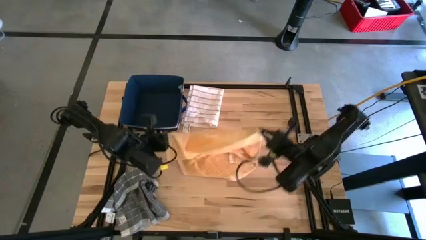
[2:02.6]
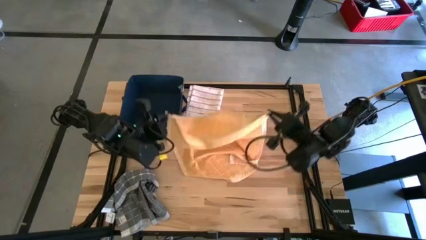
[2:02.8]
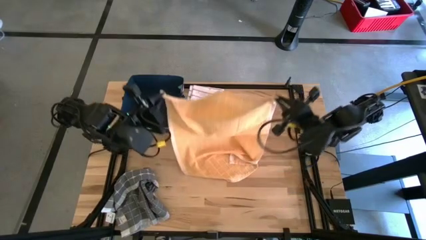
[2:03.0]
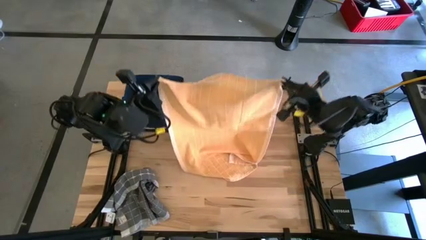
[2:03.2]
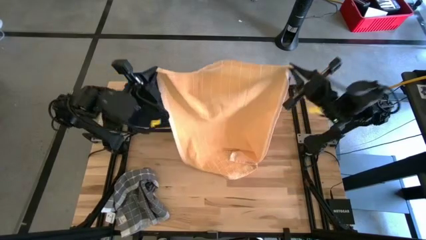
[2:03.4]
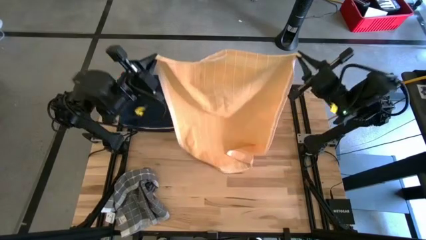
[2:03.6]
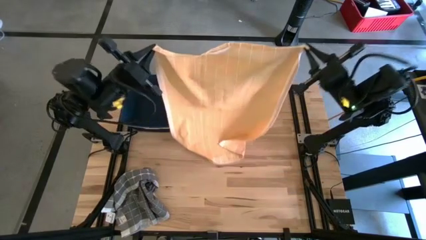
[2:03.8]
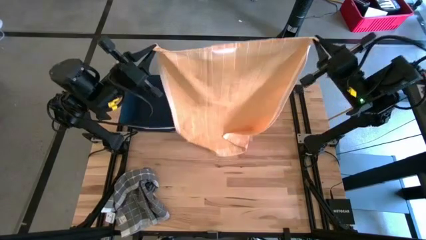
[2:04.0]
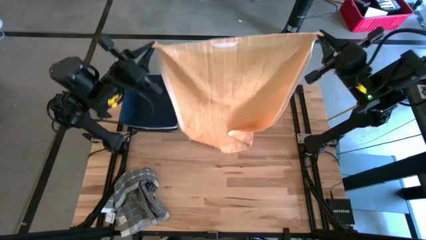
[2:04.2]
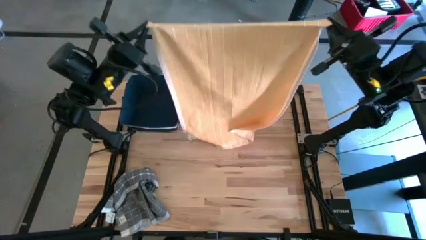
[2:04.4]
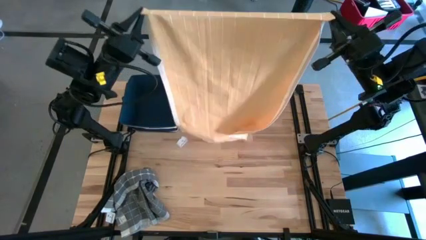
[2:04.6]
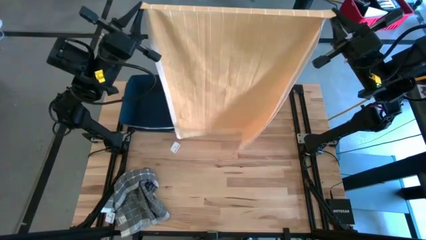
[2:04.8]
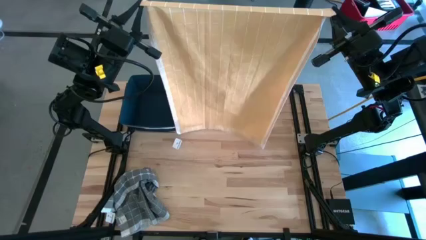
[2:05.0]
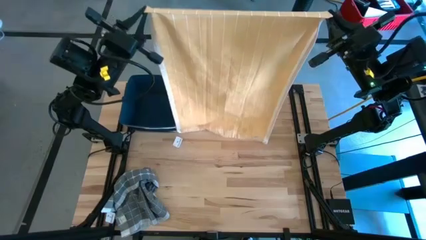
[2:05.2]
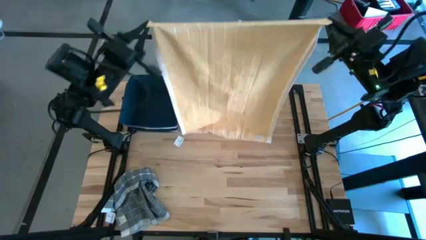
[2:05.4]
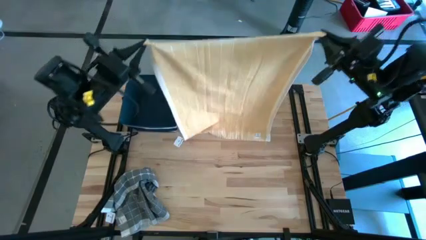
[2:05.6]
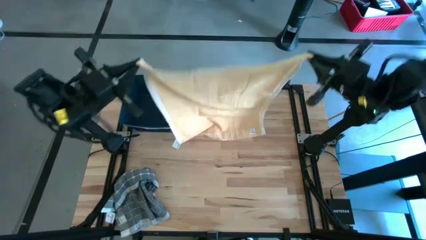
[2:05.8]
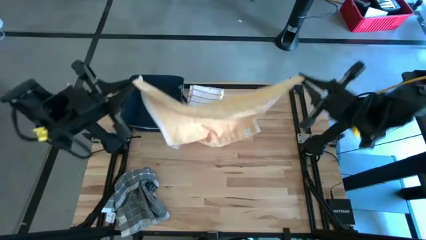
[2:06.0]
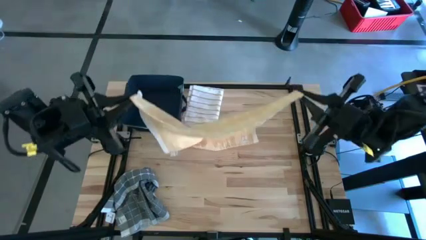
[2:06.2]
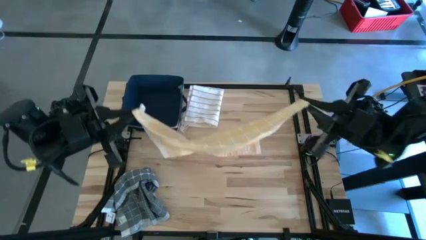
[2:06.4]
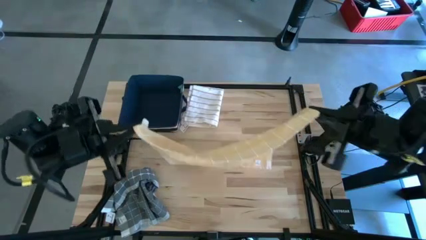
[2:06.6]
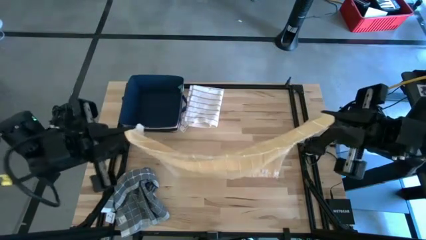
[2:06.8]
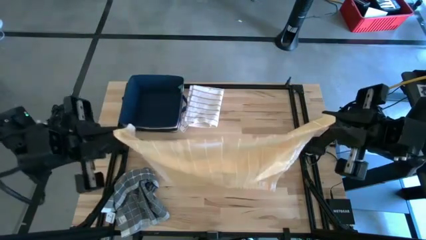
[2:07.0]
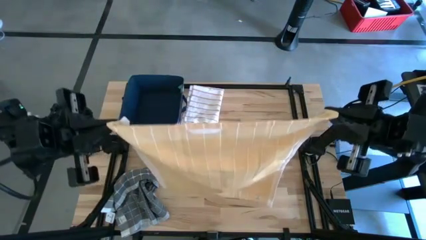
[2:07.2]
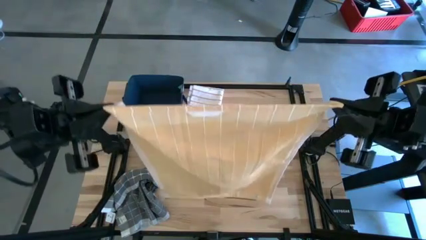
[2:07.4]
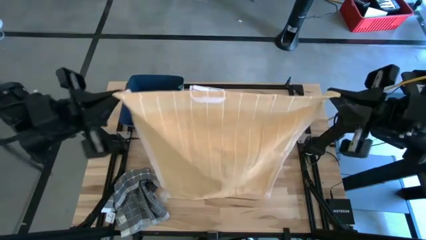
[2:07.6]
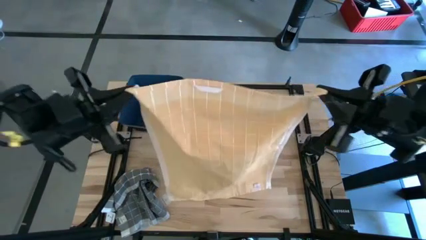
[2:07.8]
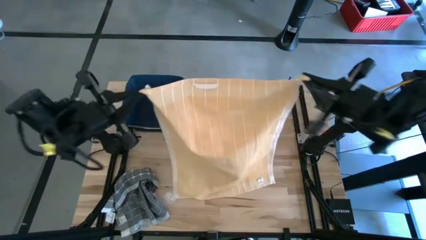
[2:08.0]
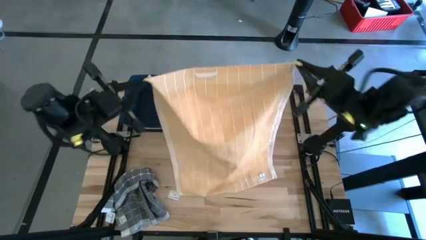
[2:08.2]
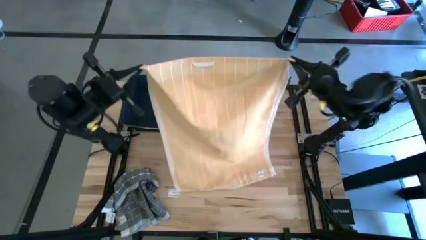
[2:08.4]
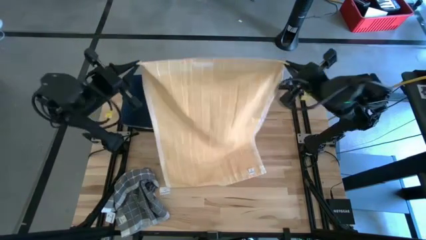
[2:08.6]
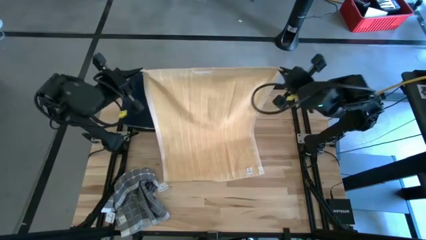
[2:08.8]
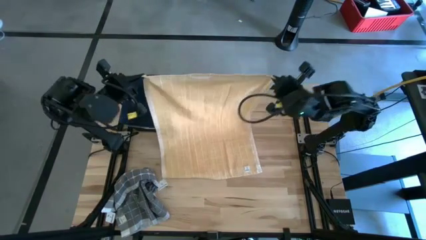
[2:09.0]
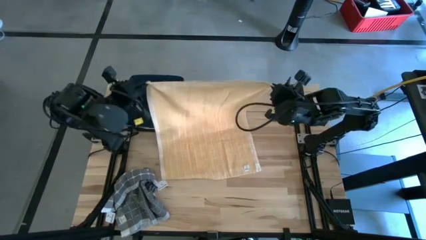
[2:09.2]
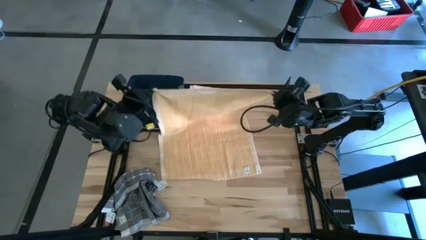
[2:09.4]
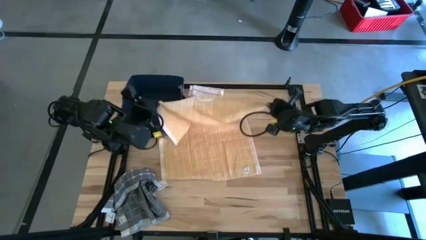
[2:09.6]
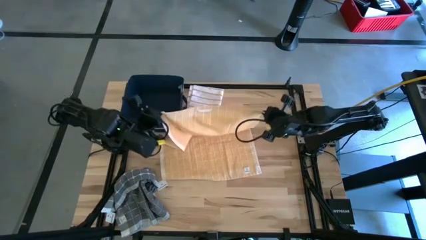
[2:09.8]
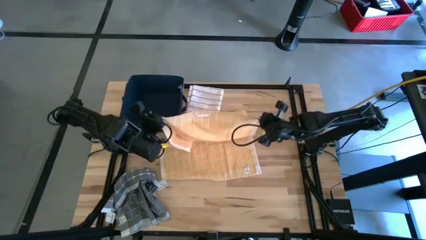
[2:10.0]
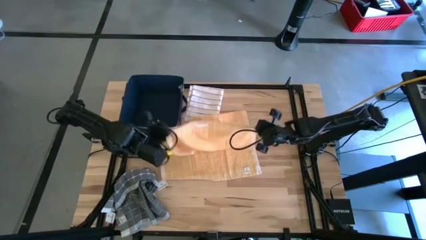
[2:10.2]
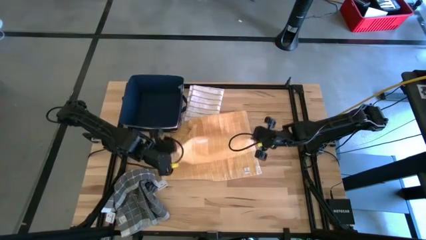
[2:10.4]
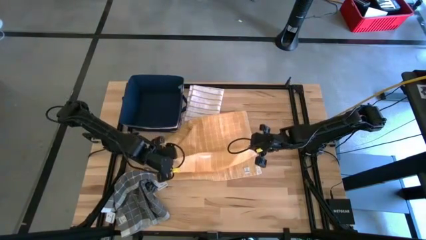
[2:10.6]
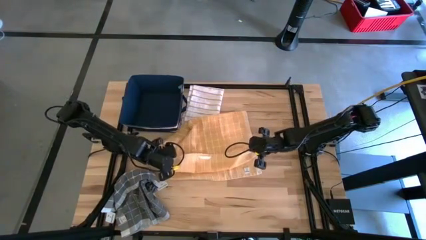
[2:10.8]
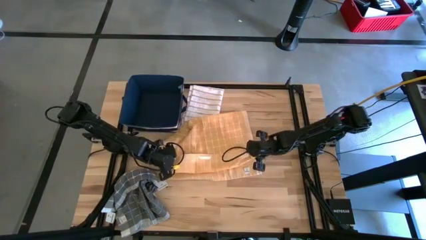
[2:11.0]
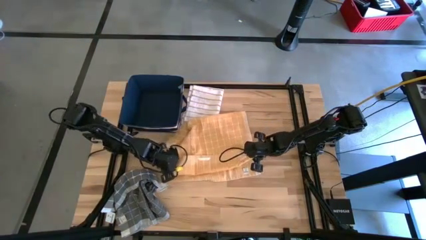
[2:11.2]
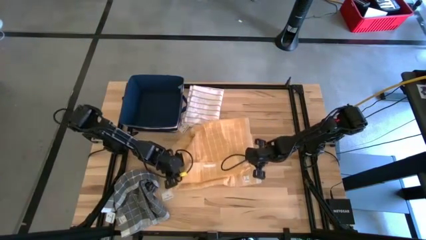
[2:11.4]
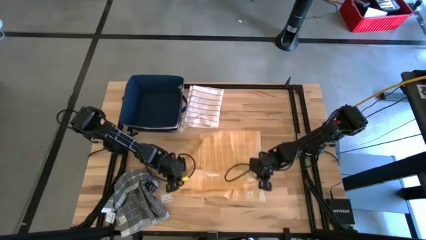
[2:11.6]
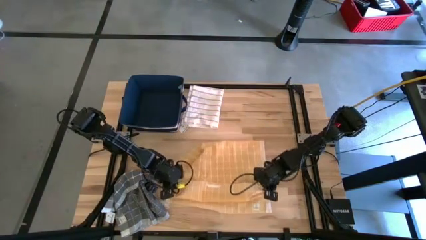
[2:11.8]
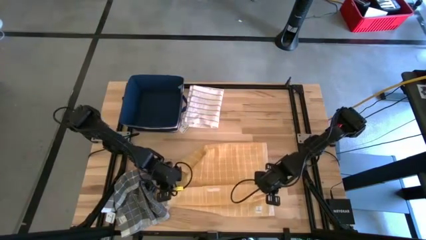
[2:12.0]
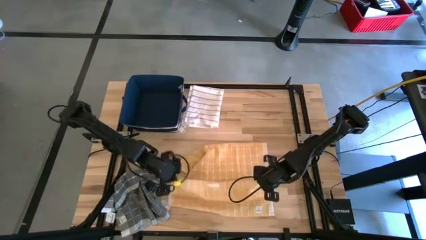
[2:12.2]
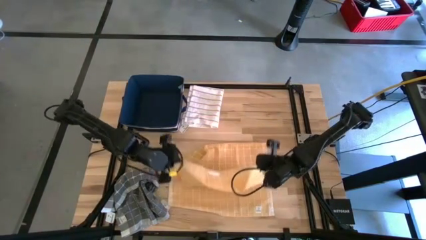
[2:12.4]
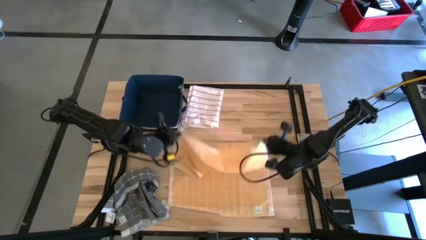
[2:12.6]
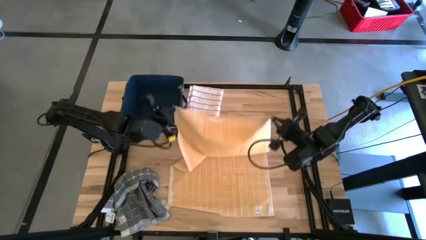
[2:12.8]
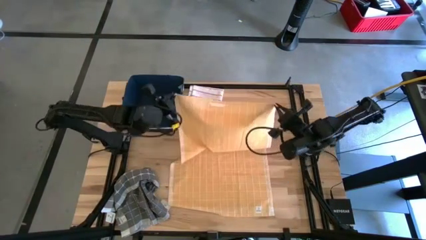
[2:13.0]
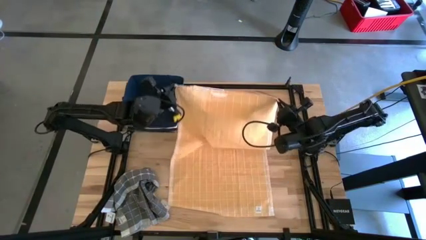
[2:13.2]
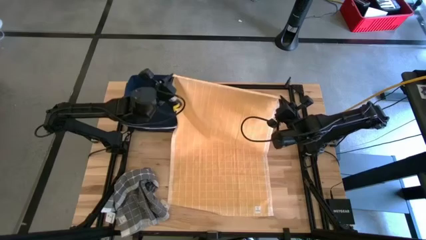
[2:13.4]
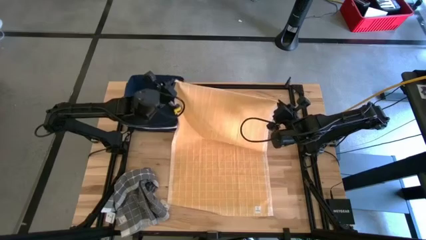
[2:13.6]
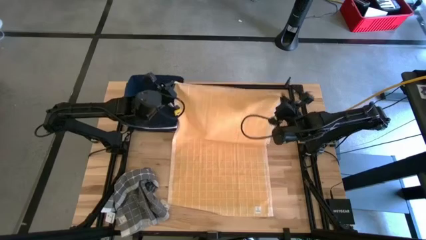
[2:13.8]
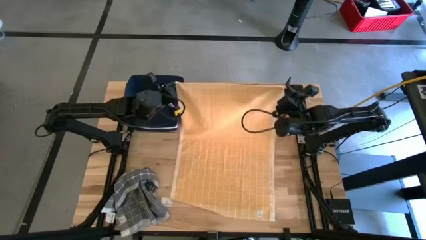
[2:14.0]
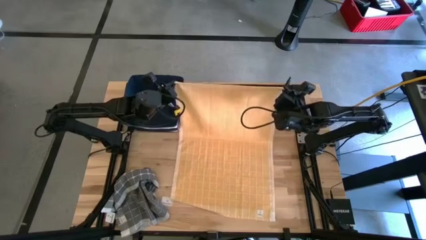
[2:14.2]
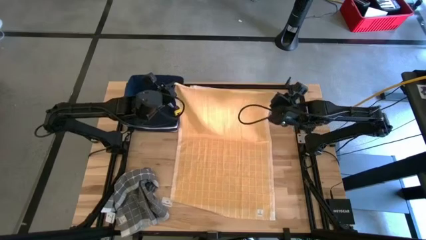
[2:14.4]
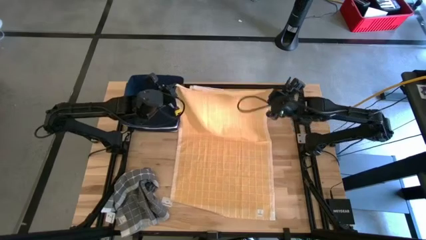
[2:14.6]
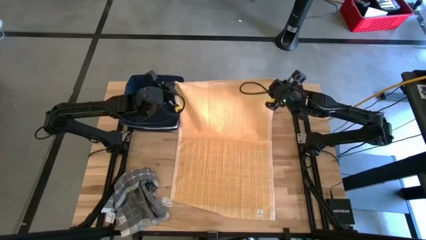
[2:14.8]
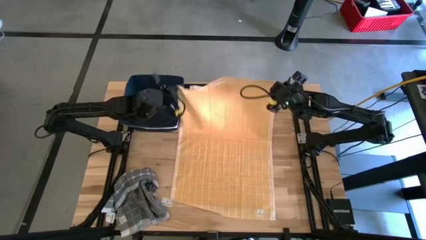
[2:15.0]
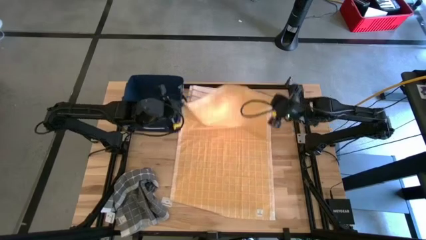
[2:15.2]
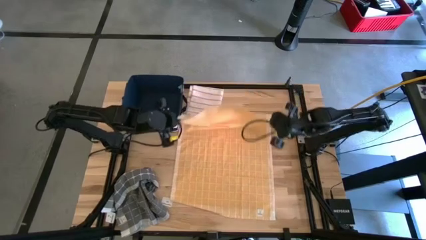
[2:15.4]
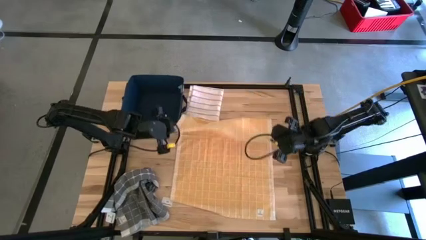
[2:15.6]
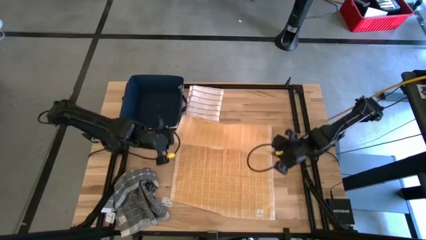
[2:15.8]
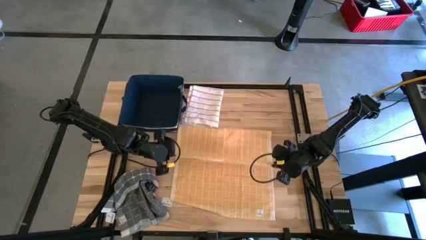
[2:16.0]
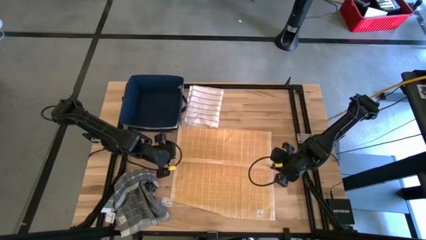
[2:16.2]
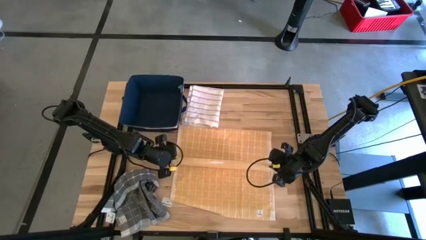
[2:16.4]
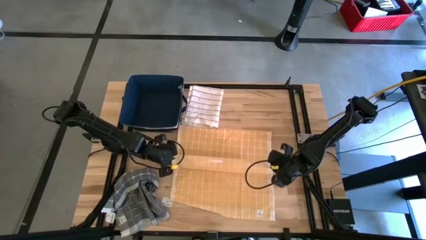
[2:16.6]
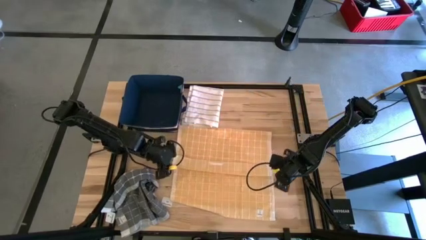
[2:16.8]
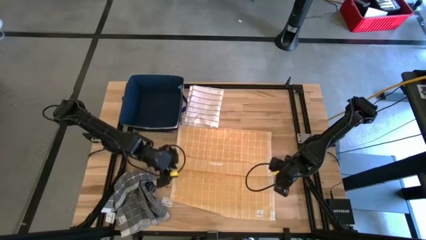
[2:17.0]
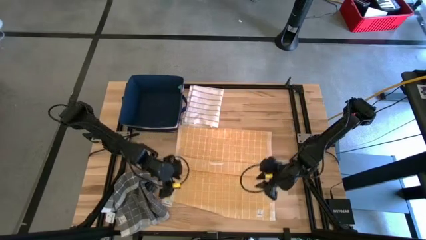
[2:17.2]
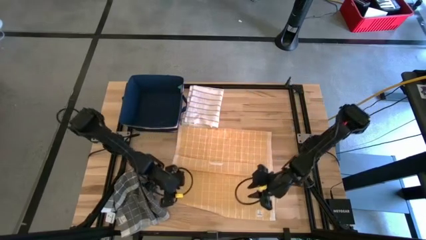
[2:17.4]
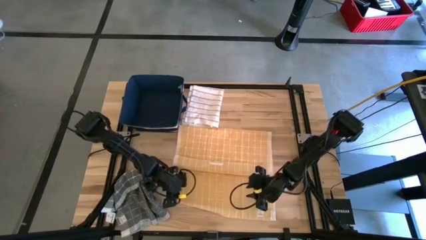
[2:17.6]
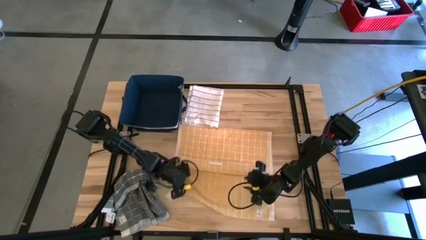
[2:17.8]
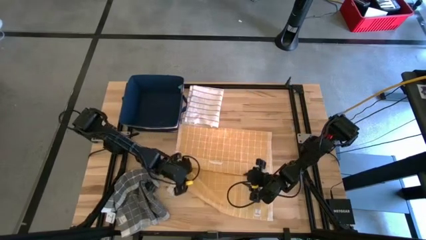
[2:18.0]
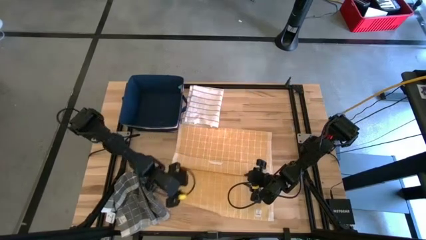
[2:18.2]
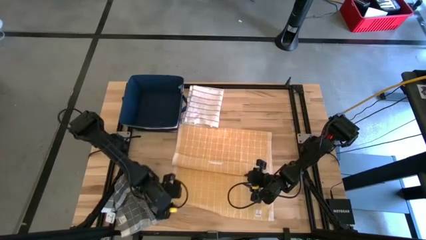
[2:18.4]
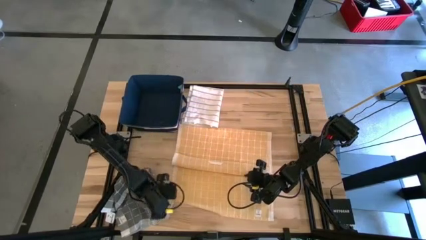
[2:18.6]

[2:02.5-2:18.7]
Task: Fold towel
Fold the orange towel

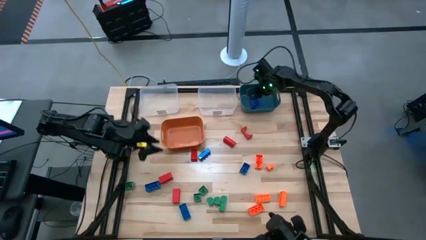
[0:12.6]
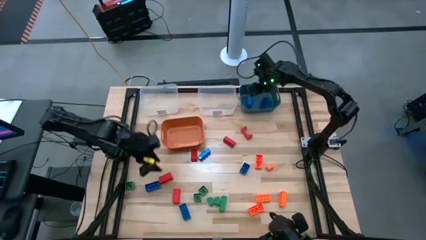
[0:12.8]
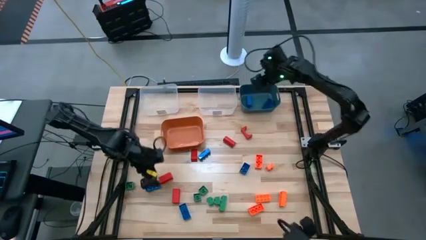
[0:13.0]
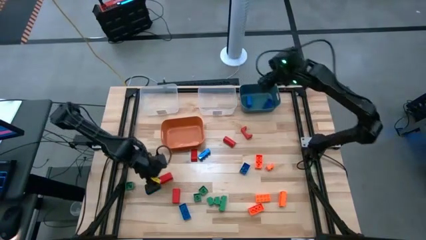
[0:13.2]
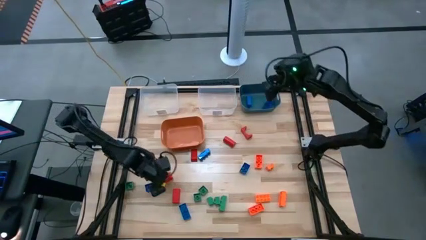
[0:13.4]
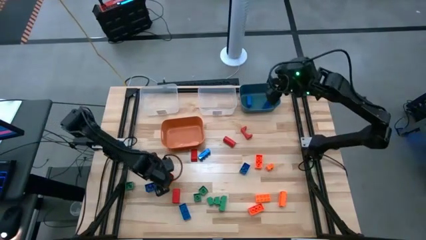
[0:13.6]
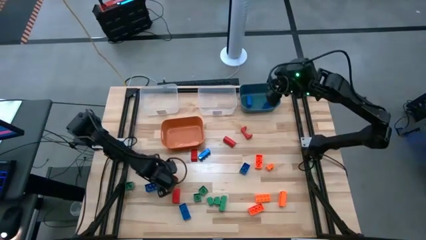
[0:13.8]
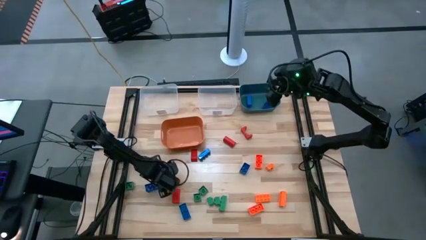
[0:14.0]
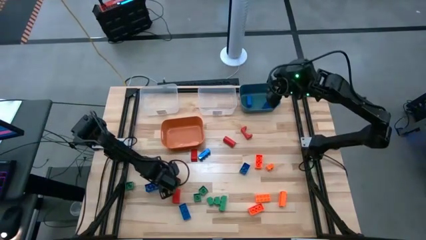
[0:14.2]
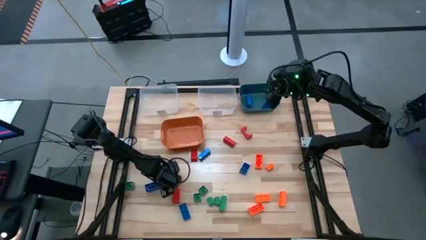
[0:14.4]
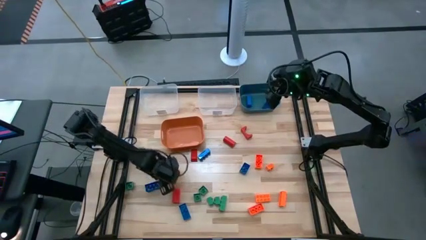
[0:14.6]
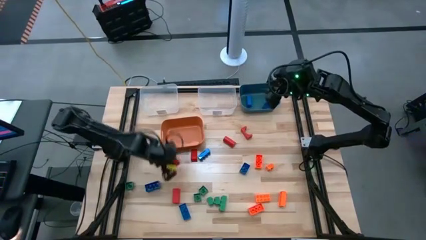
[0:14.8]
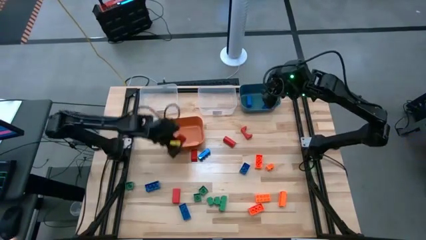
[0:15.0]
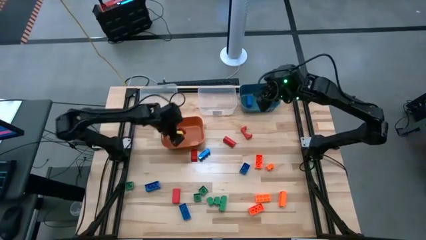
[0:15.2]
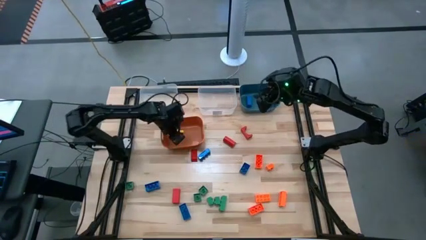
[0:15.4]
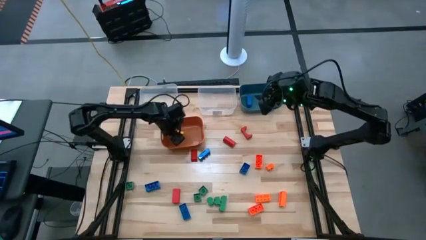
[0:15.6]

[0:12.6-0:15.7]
Task: Sort blocks
Put the red block into the orange bin
